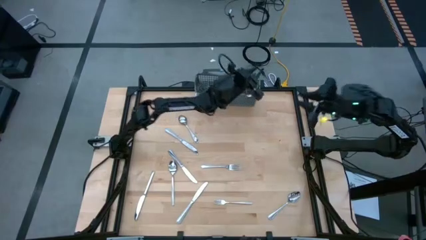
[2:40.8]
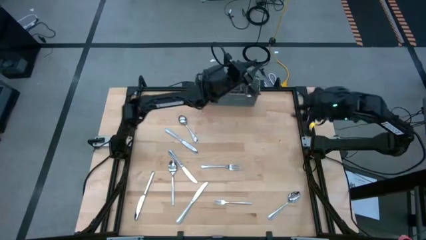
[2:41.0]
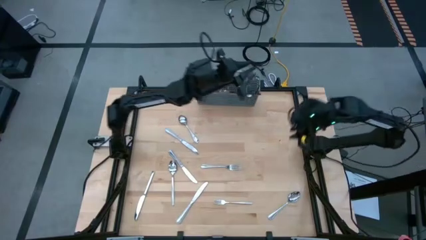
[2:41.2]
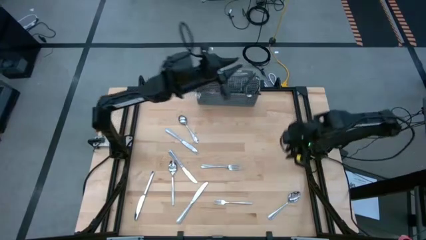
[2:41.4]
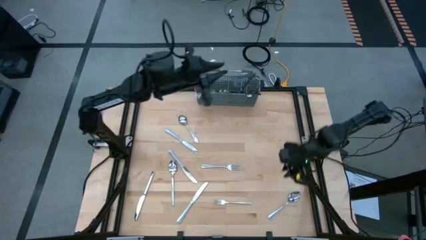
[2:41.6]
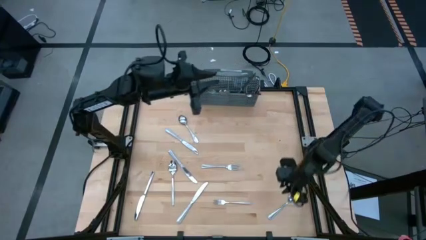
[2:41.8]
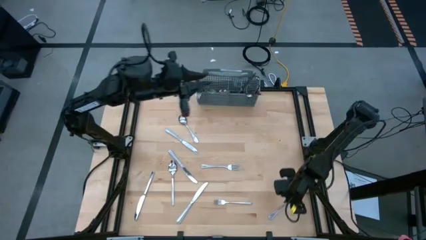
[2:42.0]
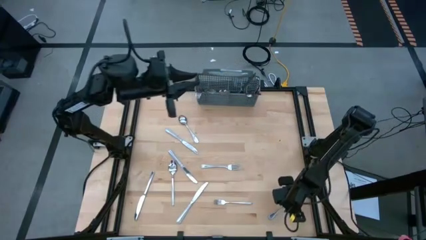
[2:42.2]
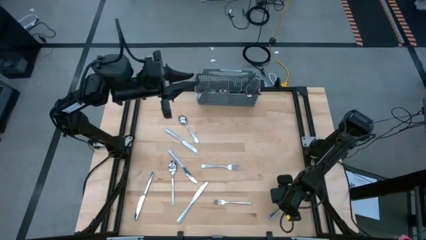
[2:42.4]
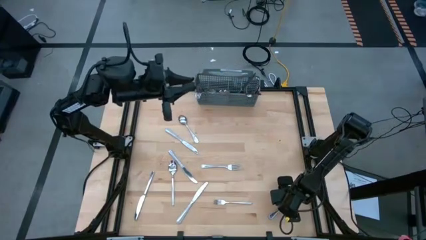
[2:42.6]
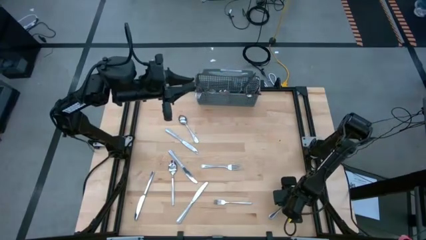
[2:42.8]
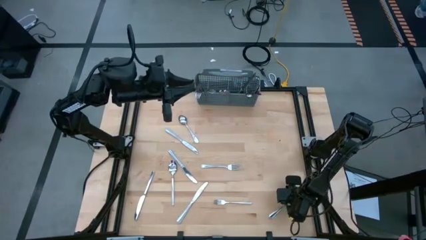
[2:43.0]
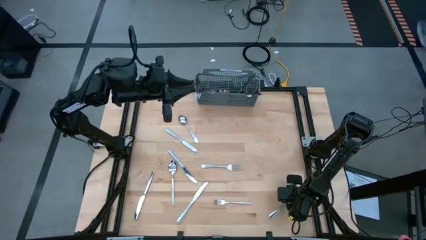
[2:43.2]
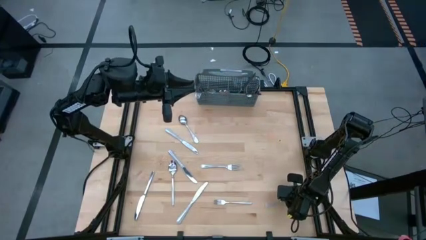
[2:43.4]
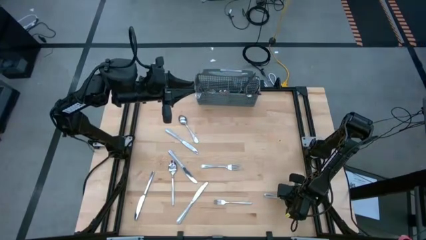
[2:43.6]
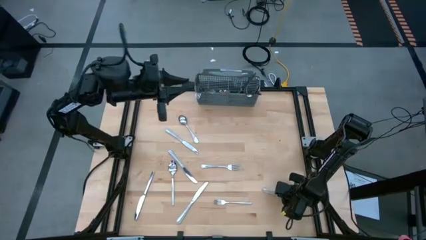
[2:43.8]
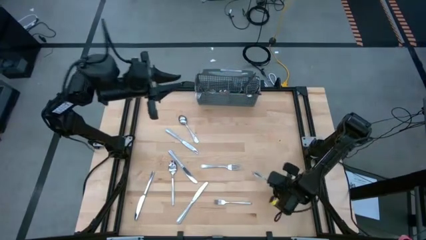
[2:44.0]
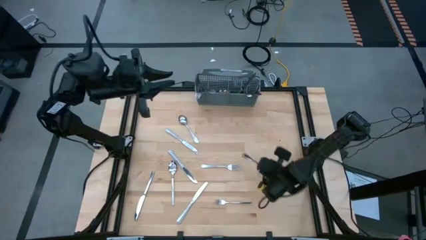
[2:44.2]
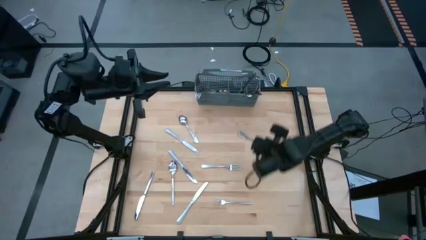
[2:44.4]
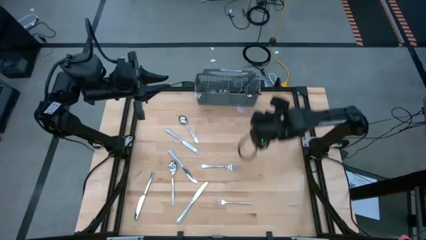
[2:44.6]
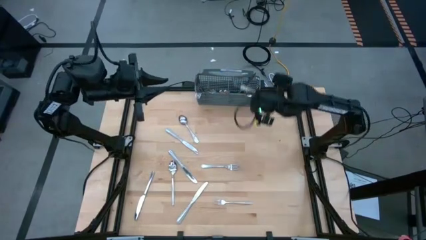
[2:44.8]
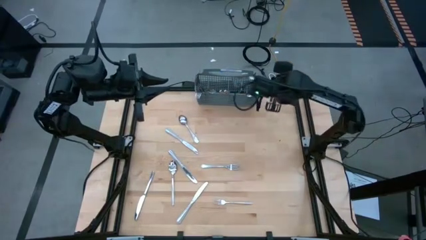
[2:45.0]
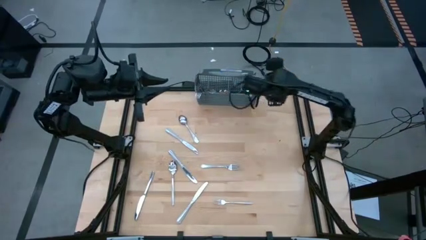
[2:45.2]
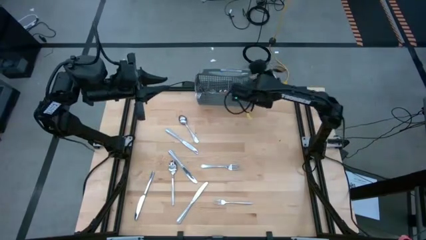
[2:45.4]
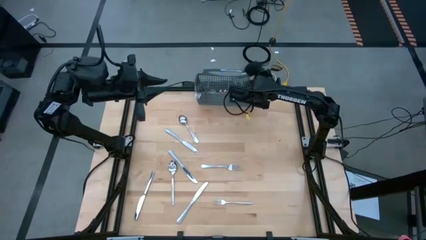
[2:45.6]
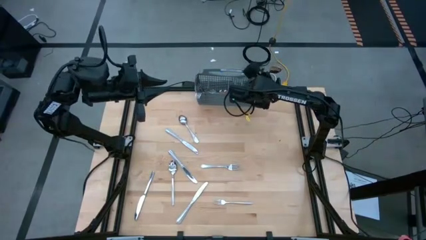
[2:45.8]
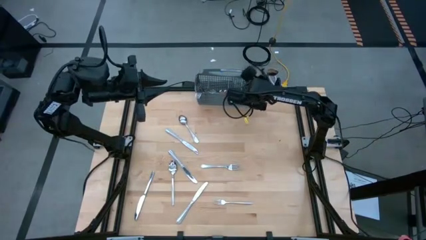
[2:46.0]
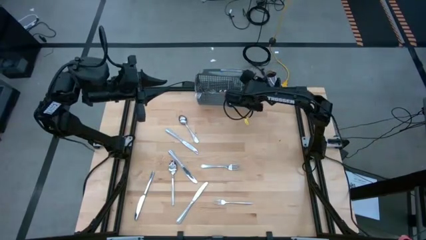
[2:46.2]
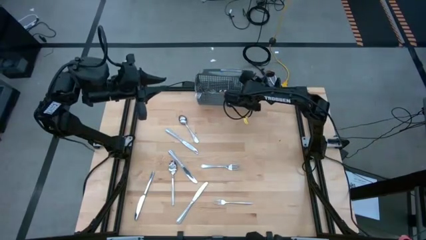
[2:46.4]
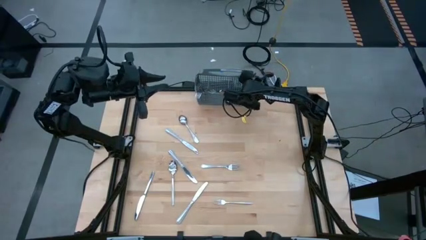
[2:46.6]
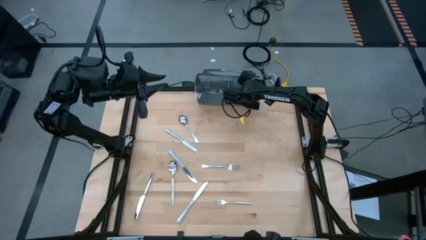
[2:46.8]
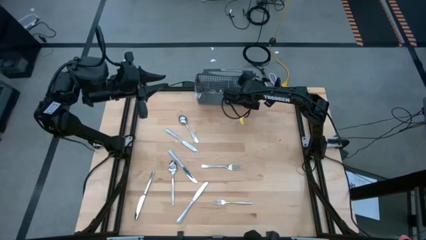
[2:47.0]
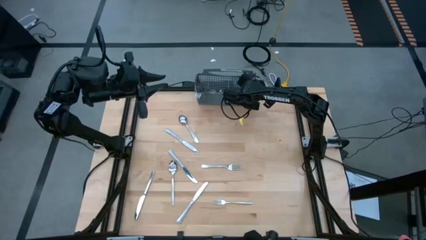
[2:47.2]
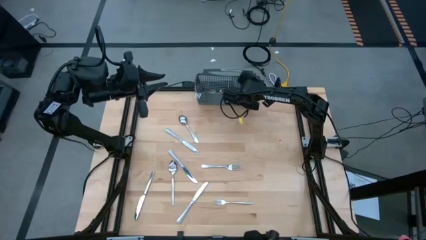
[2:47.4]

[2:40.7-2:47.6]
Task: Sort silverware
Put the silver spoon into the silverware organizer

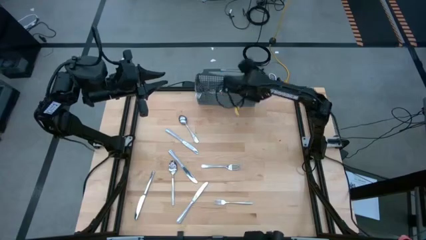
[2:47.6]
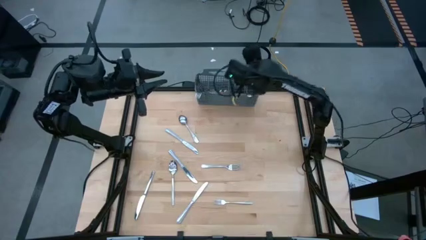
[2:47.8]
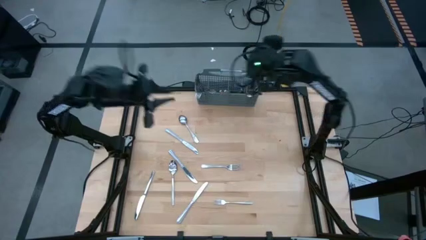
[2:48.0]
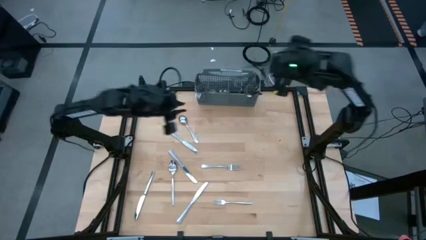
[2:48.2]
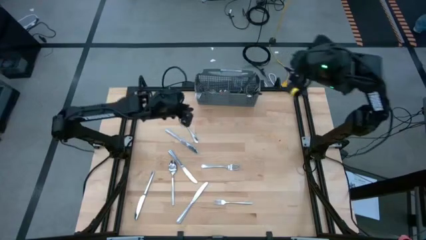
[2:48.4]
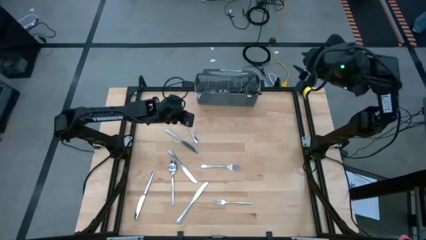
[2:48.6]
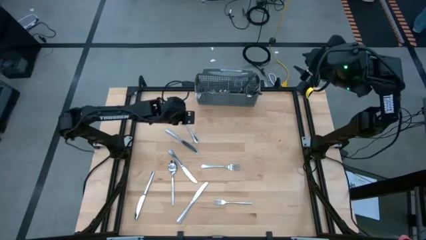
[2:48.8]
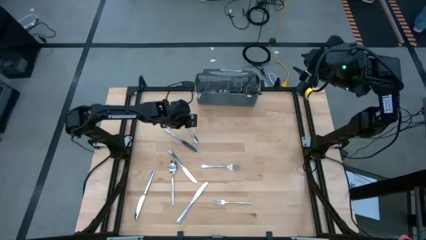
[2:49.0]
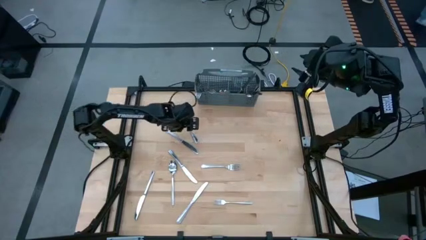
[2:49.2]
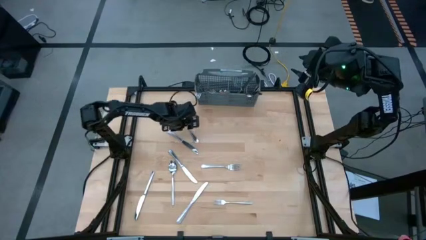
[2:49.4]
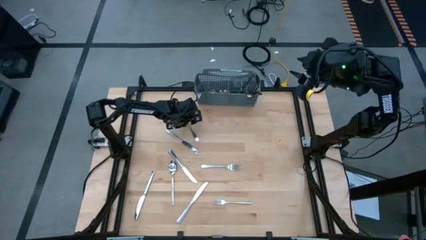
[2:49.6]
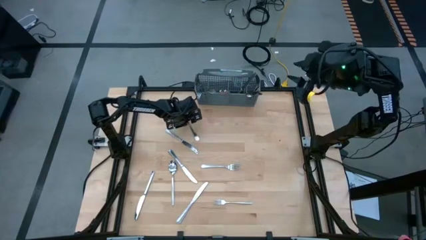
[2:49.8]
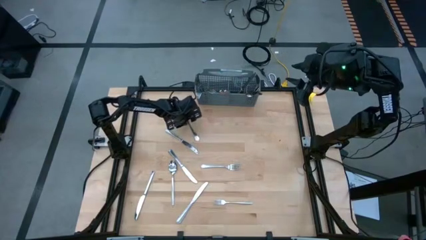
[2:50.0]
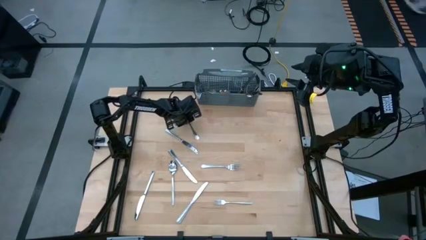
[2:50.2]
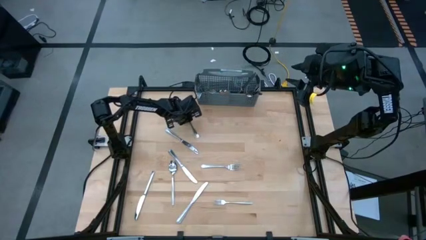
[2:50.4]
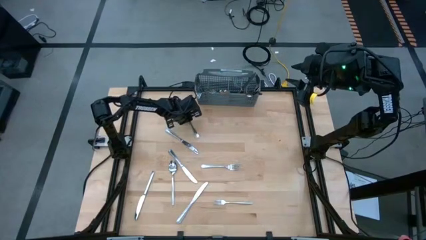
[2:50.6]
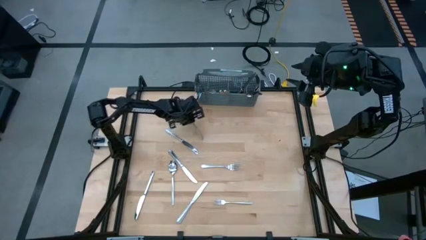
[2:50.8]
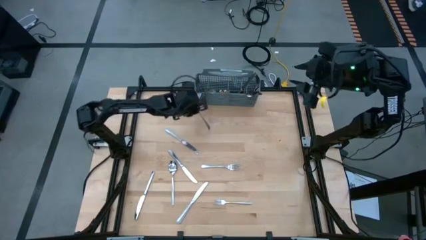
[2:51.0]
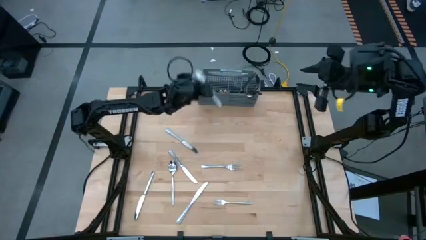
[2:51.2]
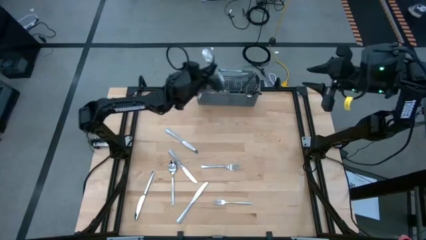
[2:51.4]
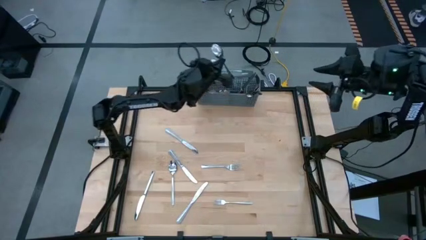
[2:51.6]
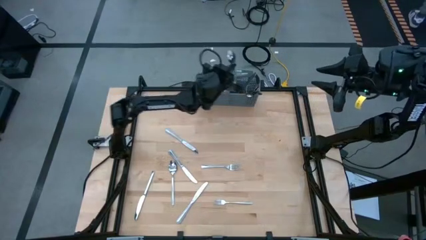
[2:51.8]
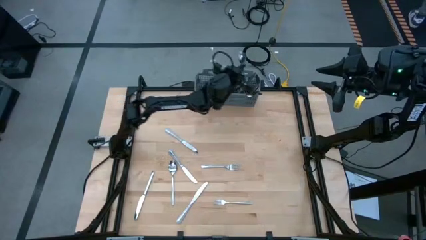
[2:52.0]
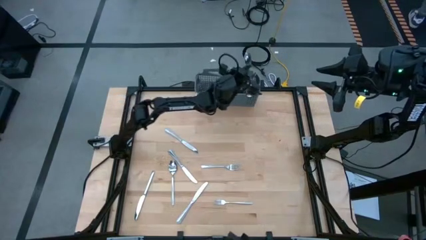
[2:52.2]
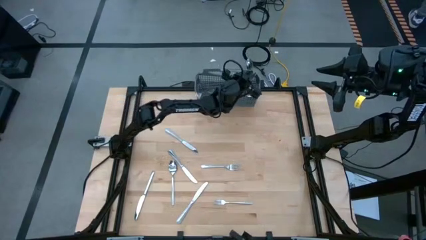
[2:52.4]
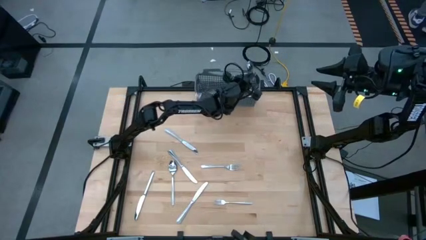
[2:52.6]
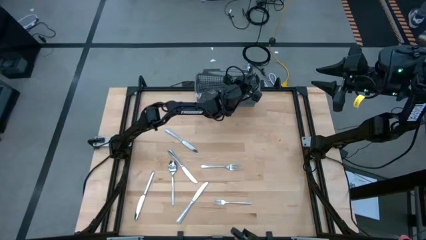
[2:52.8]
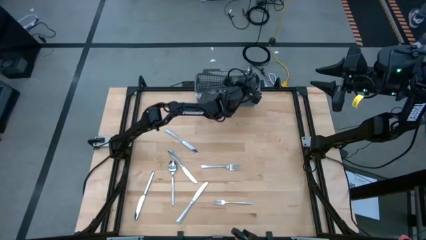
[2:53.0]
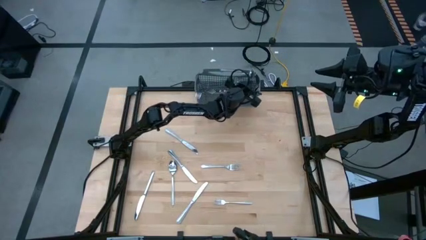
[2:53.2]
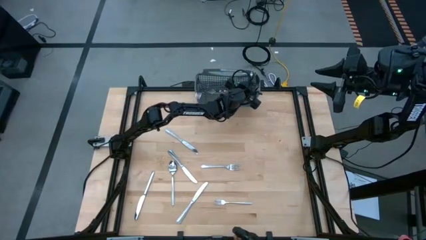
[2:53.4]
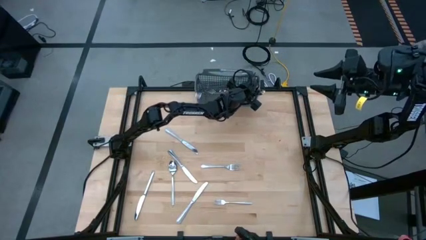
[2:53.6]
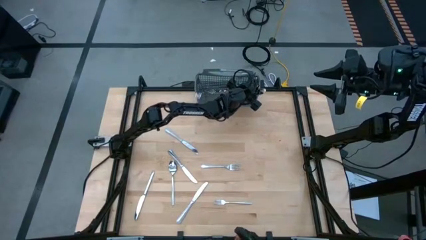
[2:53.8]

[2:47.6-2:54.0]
Put the silver spoon into the silverware organizer

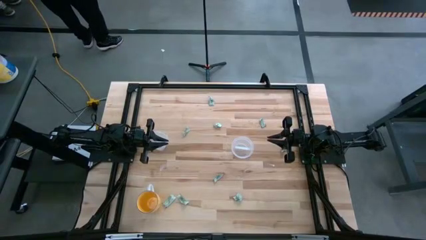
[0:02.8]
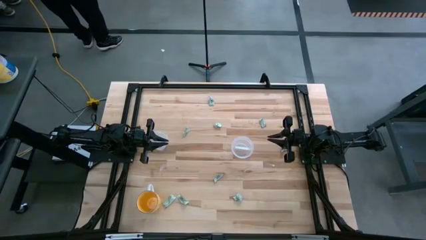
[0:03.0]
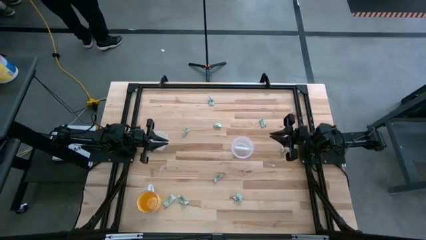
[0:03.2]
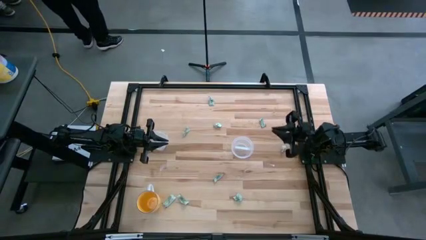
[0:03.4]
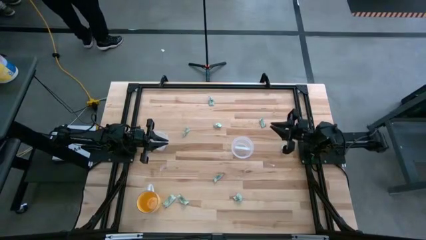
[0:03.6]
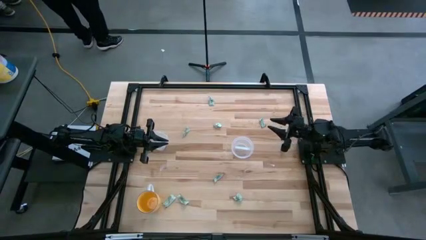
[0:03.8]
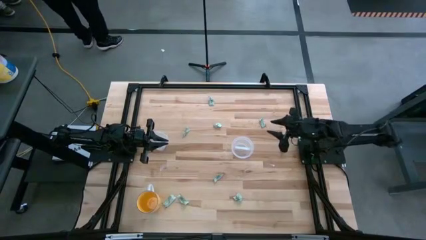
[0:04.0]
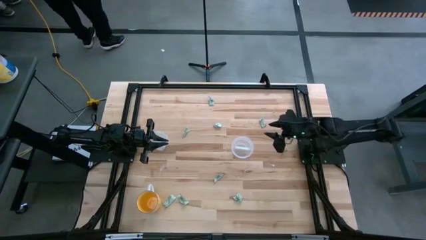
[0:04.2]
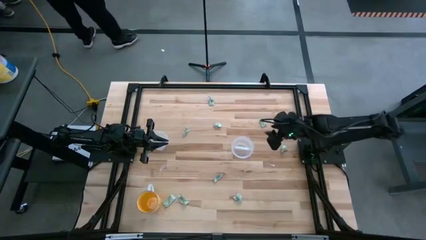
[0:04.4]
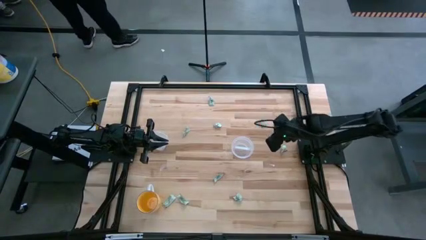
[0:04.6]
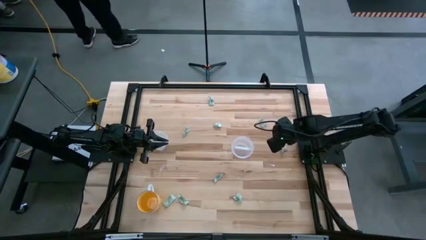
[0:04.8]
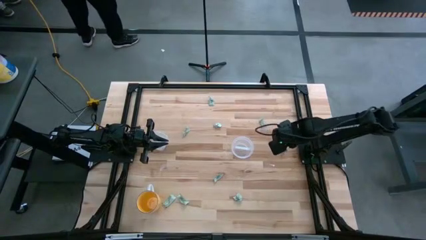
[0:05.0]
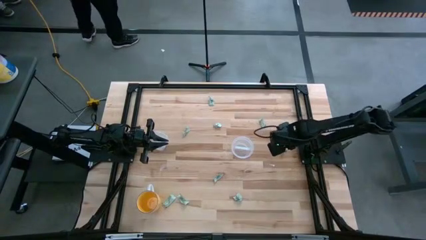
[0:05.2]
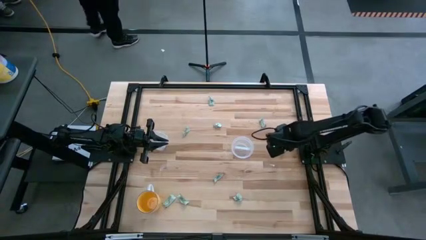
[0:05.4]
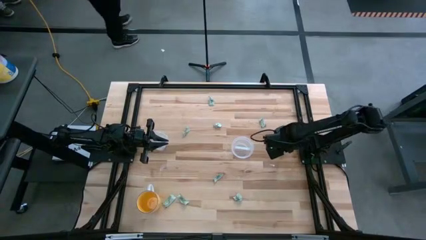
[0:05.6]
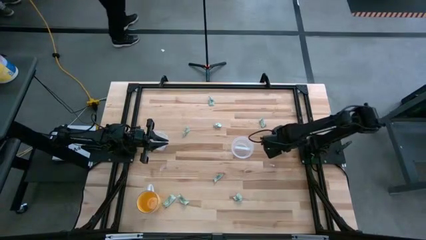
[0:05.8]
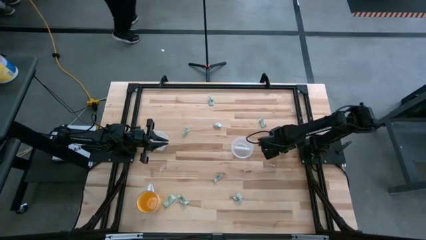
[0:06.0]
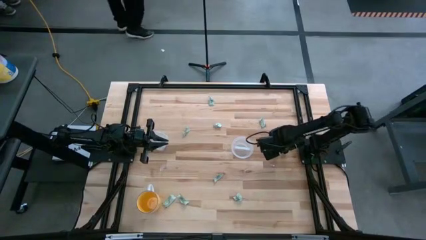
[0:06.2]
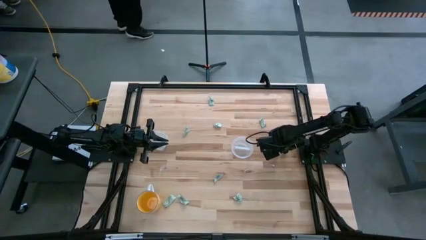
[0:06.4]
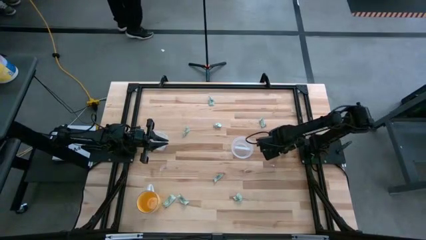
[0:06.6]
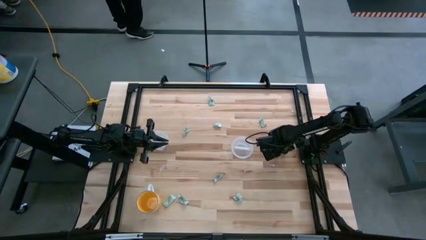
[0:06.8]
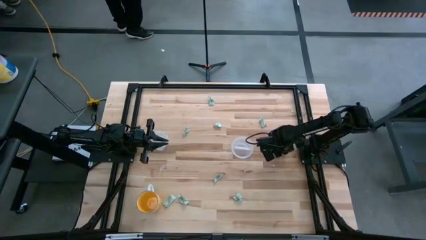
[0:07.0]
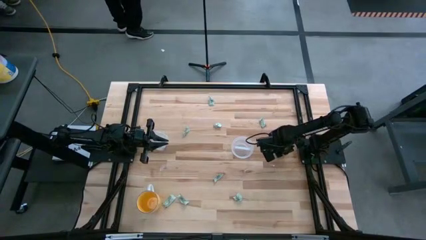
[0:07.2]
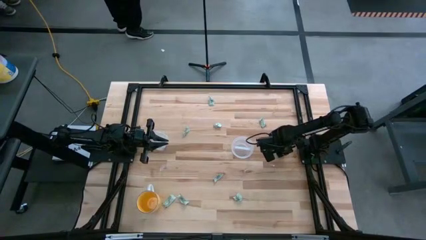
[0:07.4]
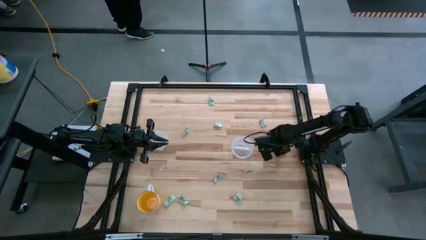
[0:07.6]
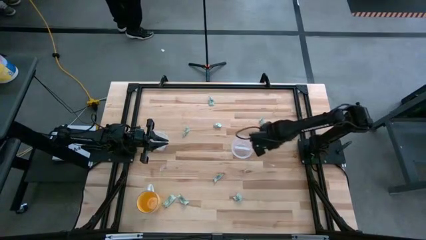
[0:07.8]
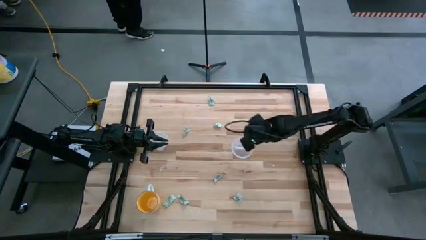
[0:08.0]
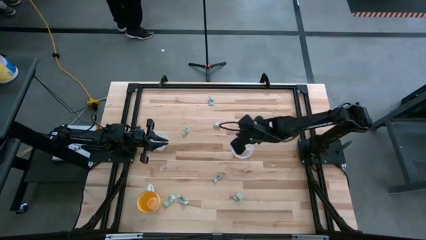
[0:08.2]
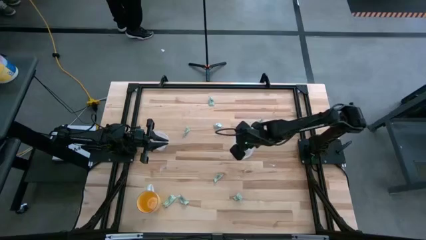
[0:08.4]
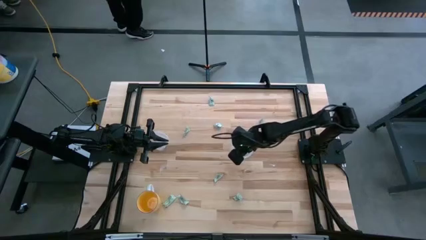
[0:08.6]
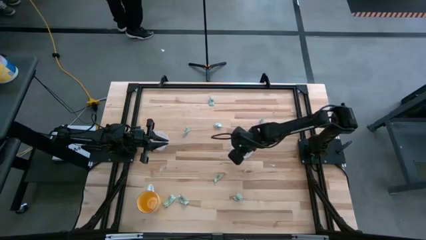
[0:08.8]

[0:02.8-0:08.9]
Task: Pick and place items into bin
Put the stevia pack into the right transparent bin
